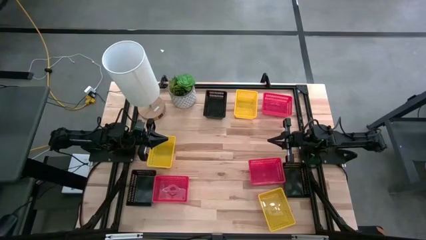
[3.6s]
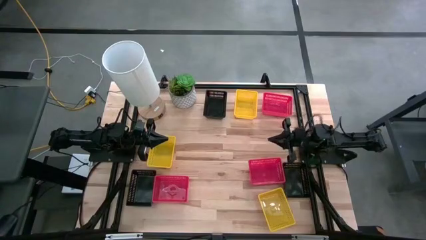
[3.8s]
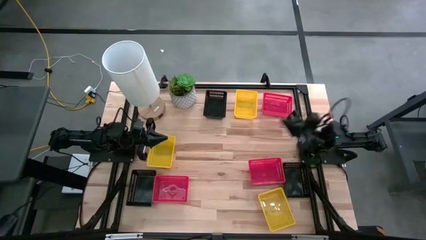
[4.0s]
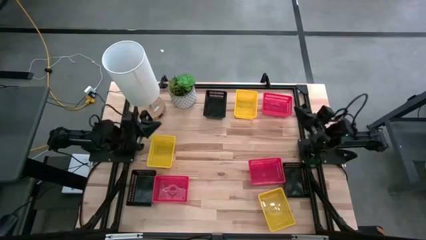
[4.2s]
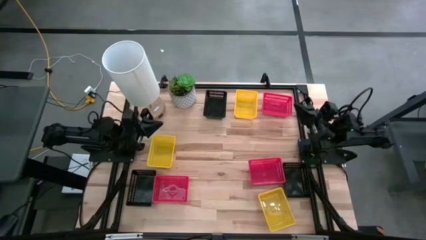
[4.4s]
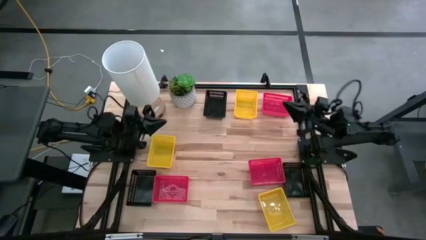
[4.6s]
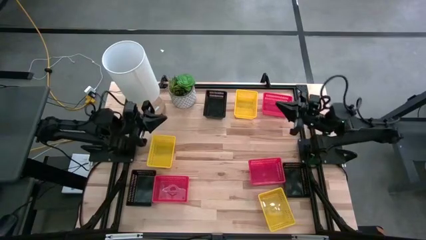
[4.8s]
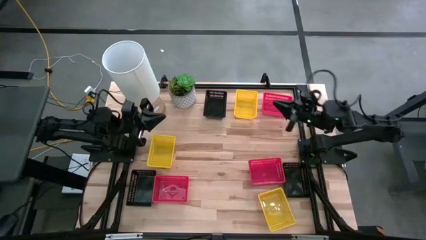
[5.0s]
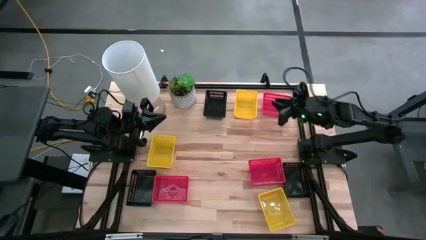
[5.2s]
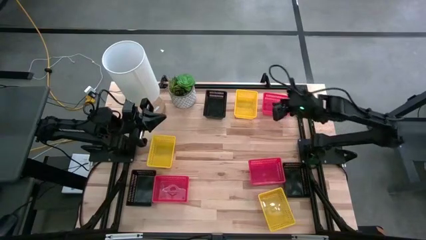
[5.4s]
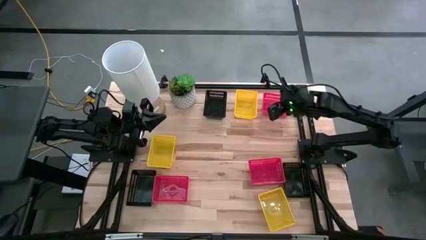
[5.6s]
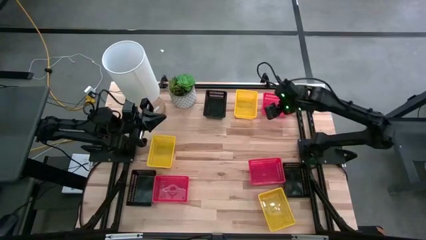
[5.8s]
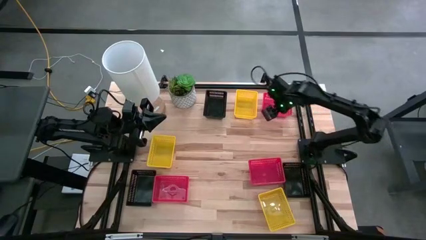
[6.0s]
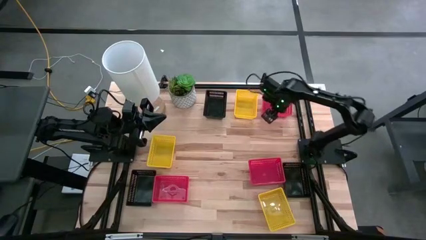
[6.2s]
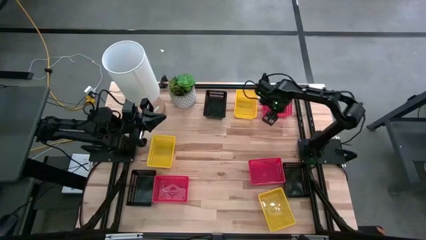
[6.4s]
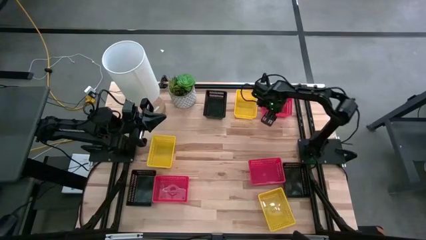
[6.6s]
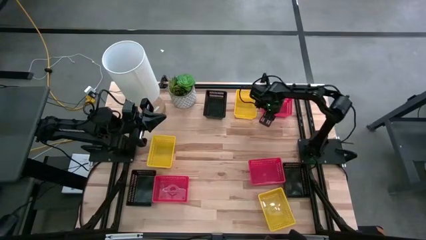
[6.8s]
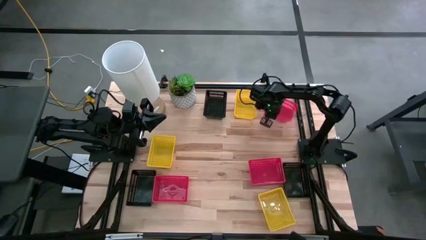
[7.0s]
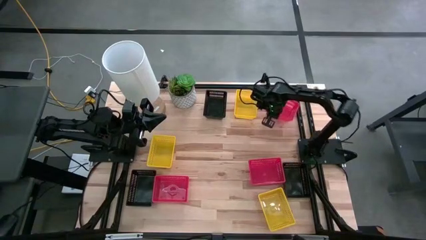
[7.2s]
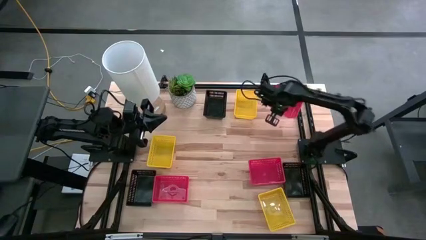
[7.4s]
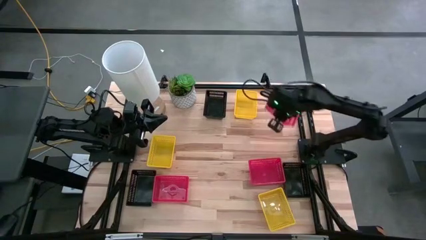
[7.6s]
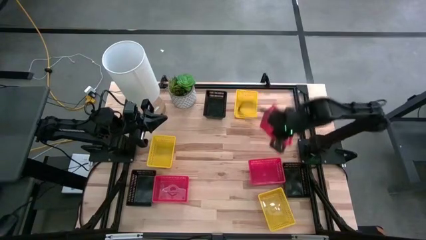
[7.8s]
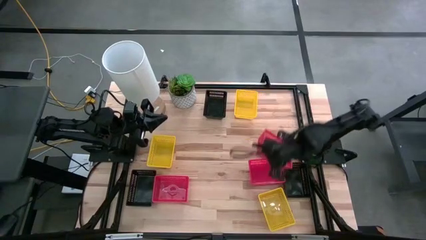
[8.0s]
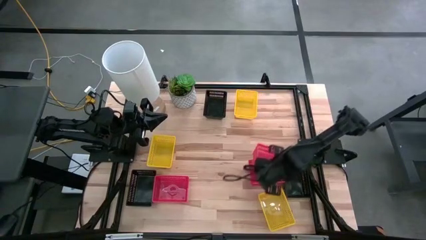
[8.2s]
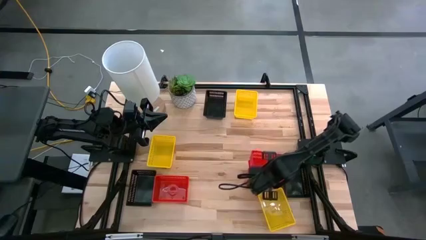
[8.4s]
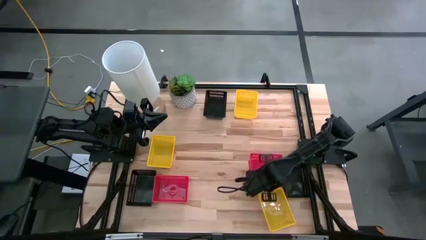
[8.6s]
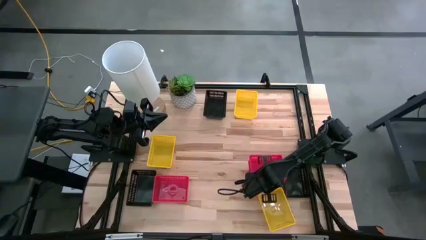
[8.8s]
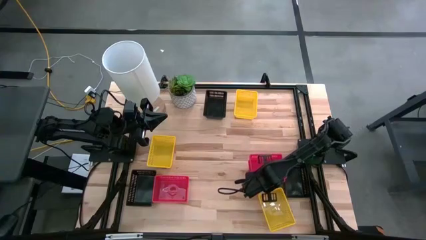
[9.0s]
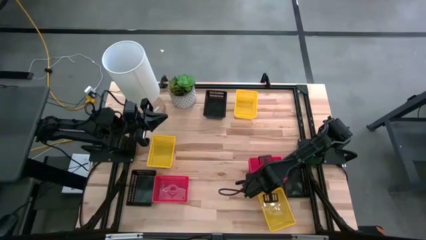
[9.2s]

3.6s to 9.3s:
Stack the top red bin on top of the bottom right red bin on the table

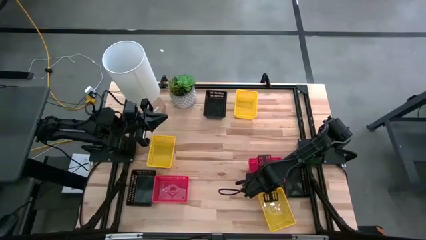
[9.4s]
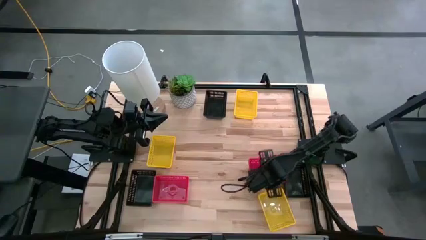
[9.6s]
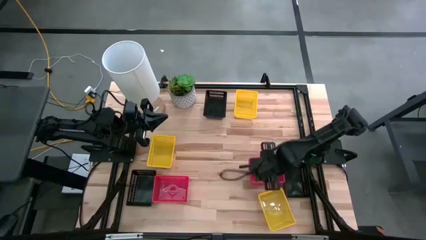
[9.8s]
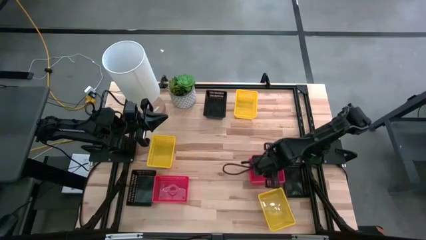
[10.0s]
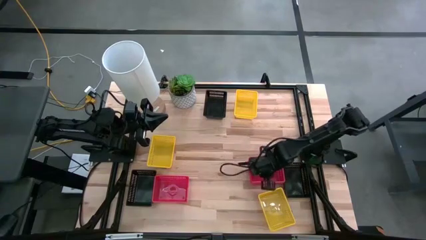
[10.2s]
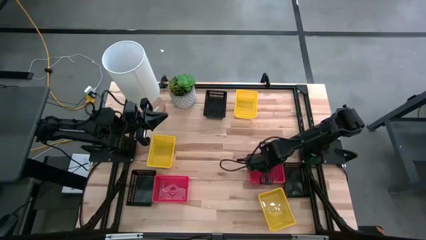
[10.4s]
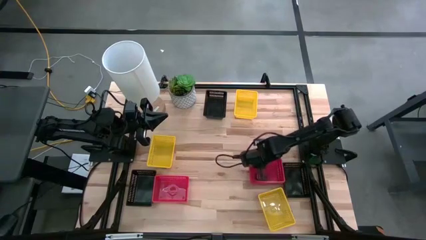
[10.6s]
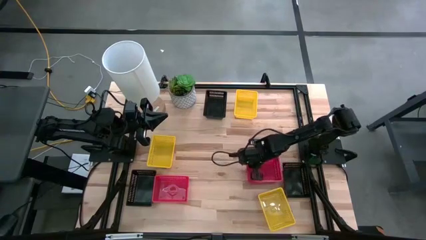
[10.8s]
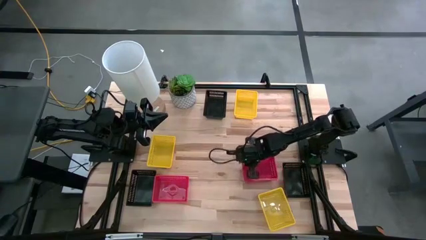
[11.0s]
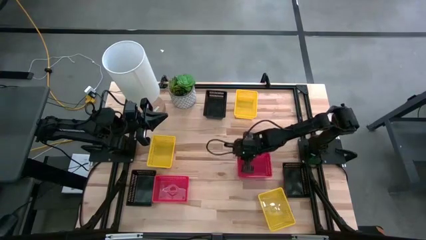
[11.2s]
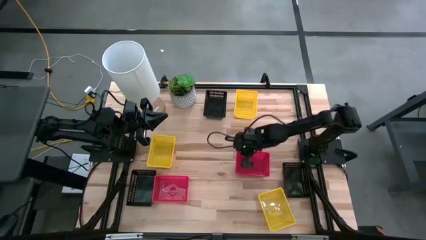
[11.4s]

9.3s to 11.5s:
Adjust the stacked red bin on the table

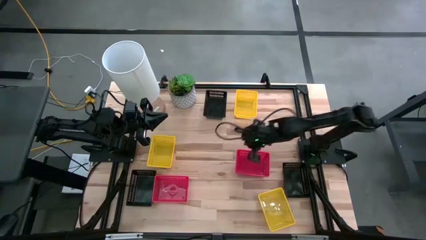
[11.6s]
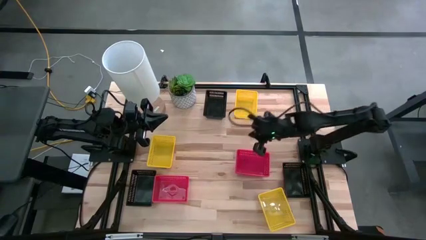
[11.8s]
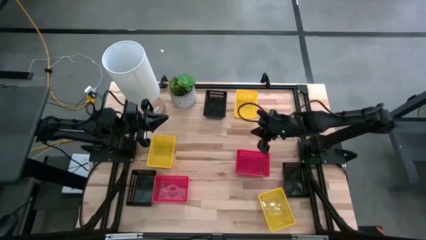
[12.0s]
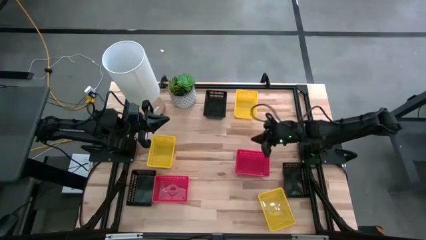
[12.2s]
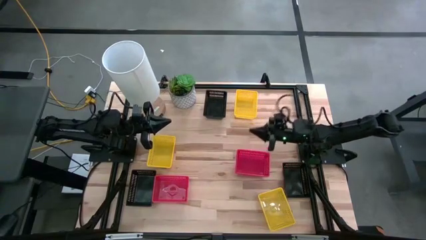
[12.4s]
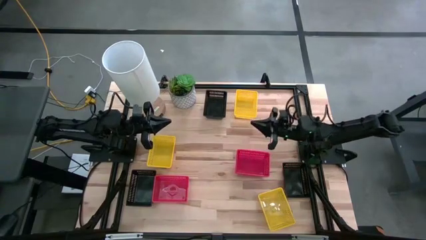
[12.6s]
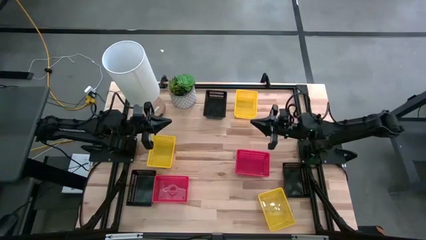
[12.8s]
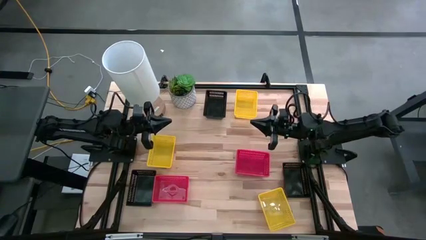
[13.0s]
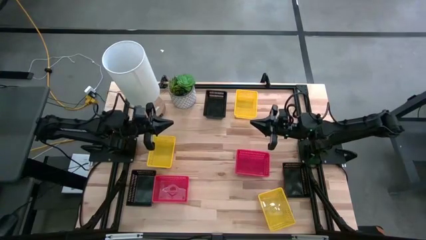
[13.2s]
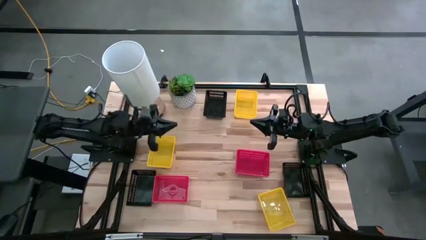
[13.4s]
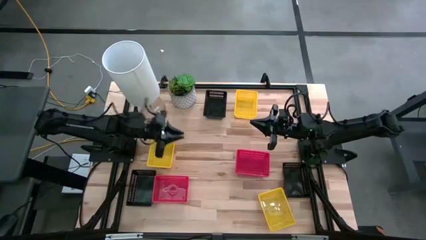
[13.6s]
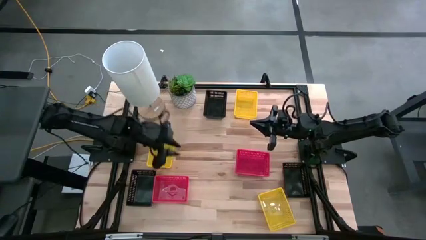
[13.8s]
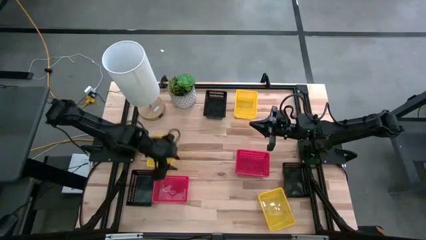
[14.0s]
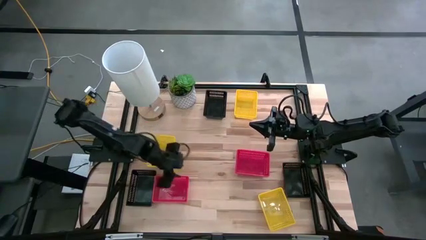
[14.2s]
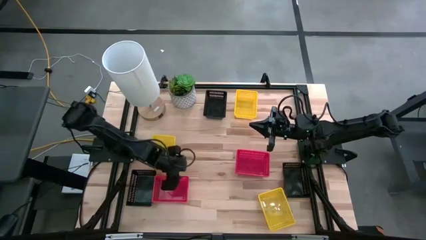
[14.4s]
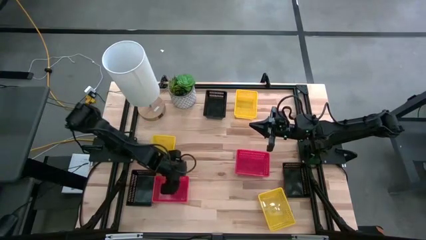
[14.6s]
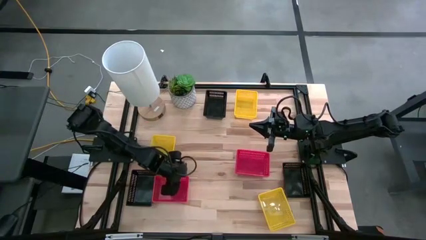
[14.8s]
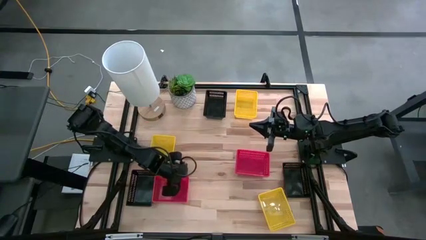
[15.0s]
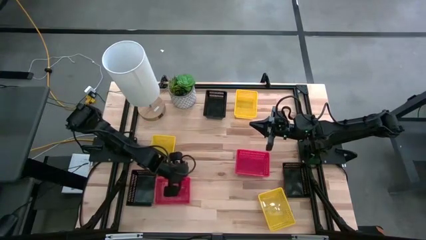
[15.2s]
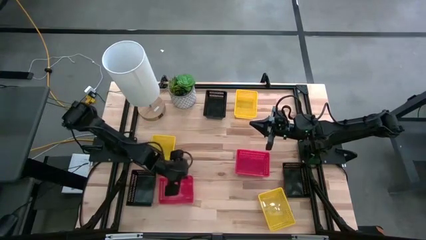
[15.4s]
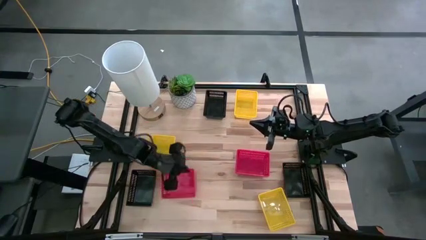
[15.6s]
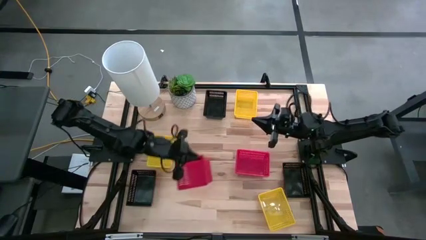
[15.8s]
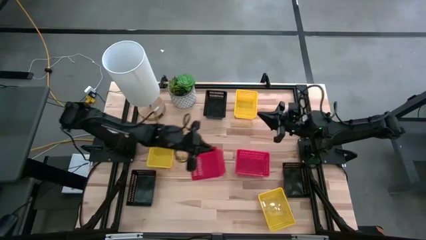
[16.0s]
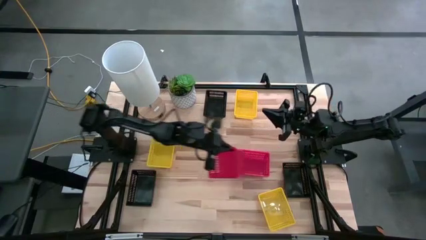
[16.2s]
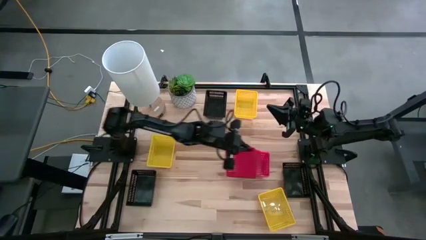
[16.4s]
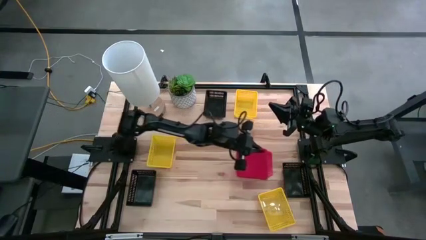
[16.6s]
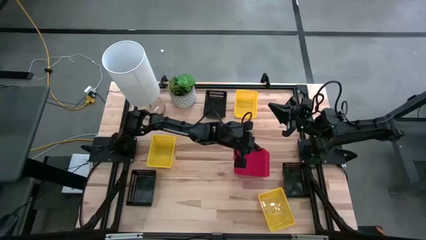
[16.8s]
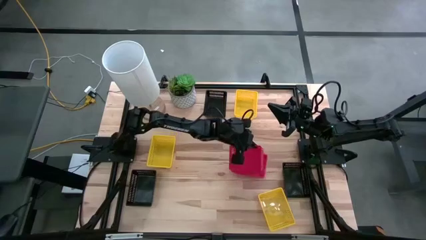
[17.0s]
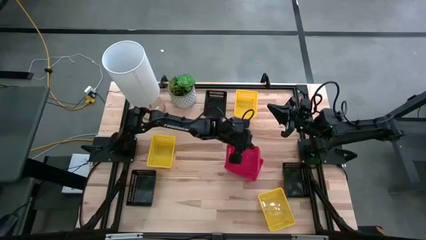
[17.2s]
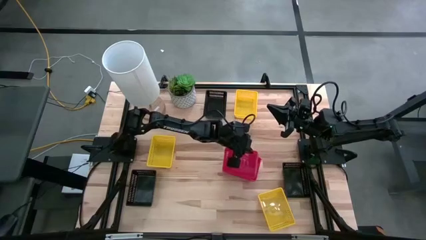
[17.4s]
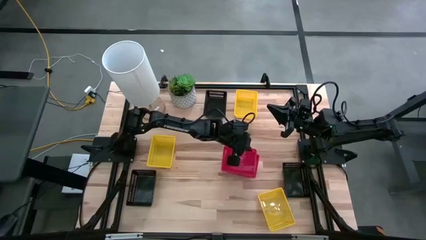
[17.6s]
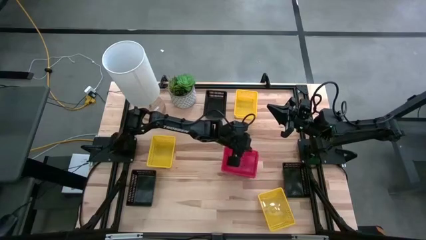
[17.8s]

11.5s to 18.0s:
Stack the left red bin on top of the right red bin on the table

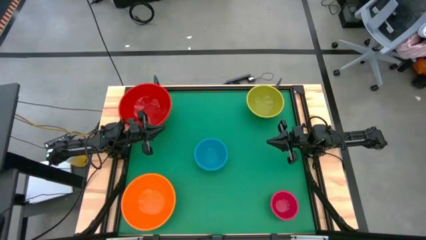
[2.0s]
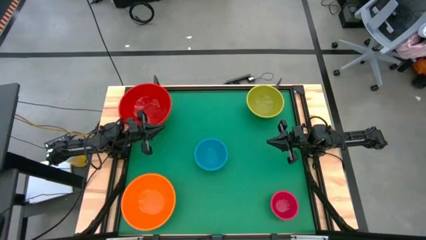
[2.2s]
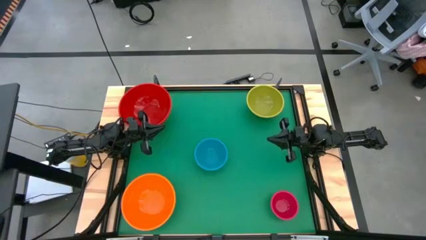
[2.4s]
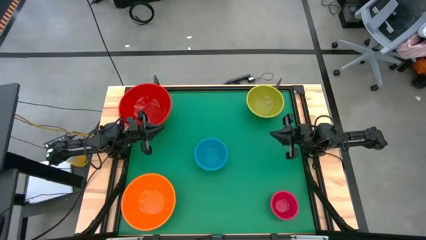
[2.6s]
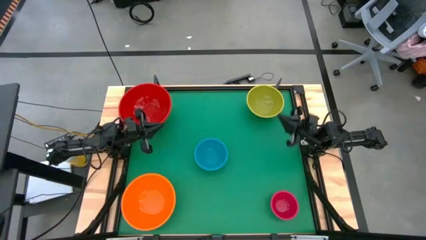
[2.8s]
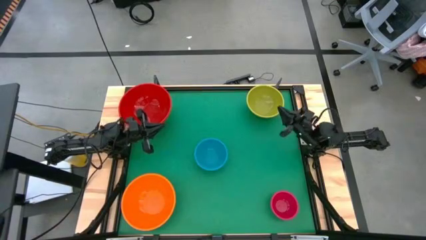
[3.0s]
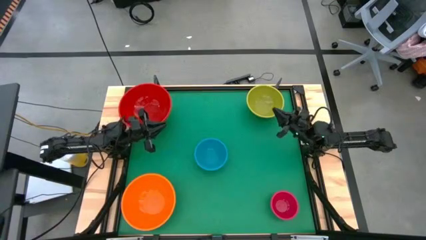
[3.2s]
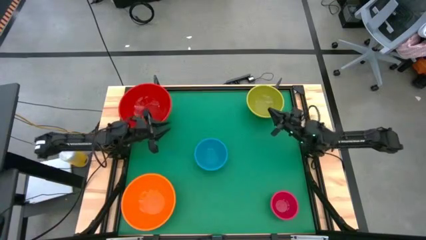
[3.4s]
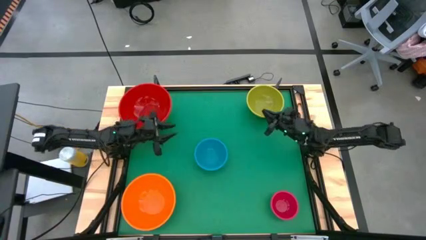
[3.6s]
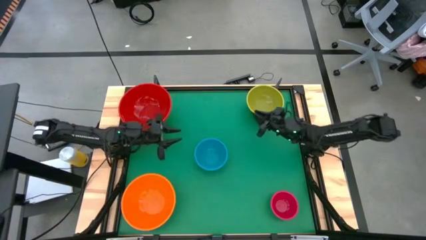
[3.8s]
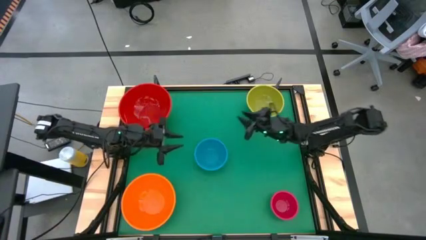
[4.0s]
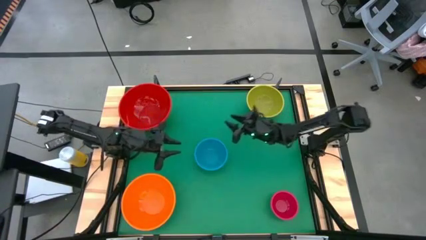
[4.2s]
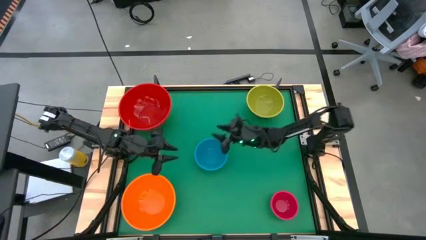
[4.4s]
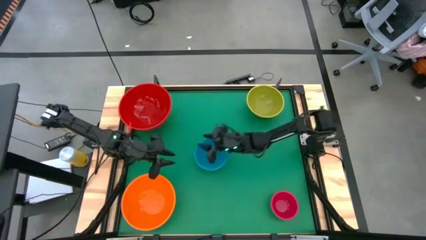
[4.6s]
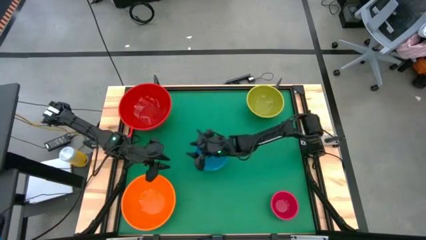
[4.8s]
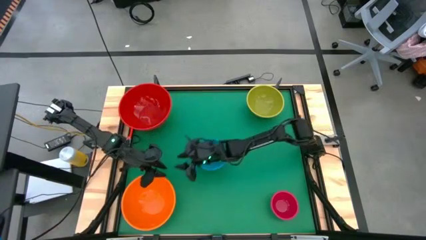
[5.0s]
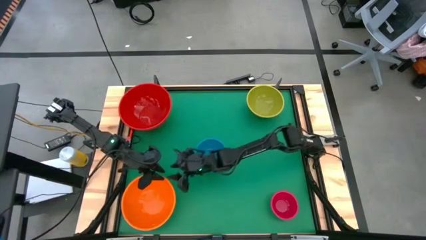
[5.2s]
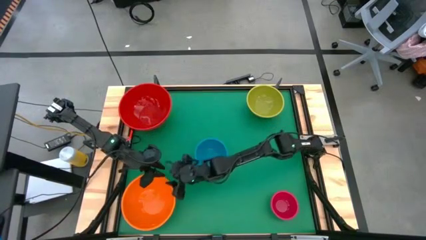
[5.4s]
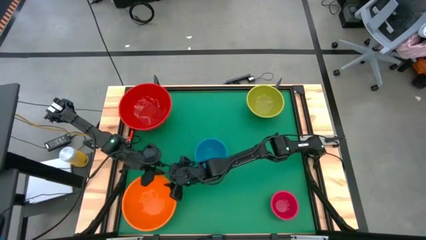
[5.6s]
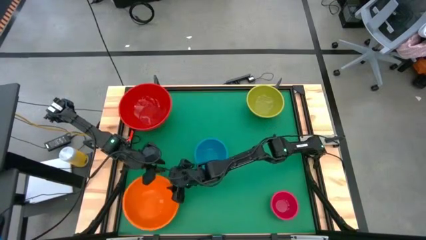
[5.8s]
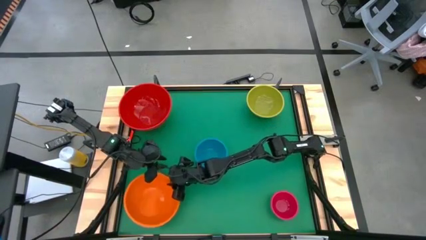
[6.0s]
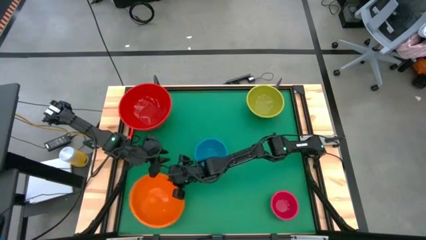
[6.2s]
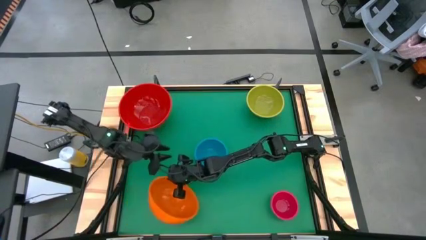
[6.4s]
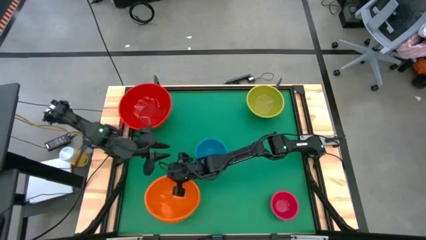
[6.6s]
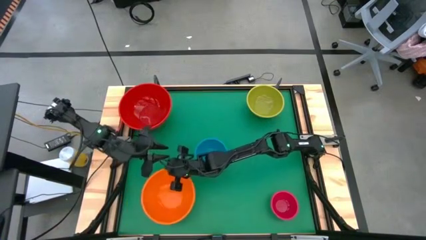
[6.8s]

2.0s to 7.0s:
Stack the orange bowl into the large red bowl
